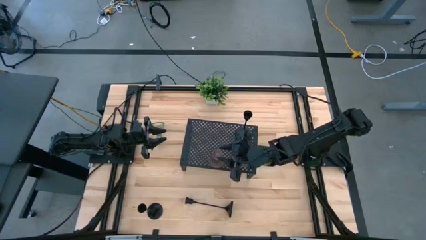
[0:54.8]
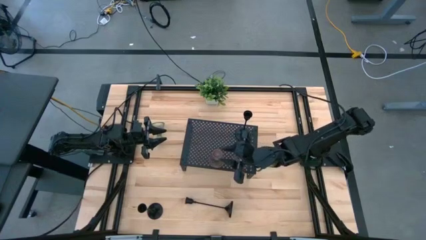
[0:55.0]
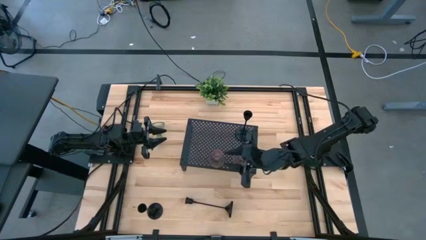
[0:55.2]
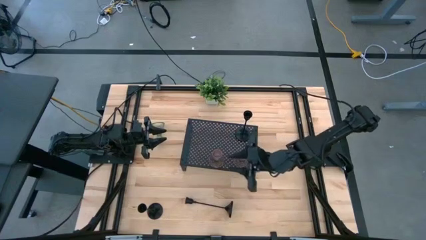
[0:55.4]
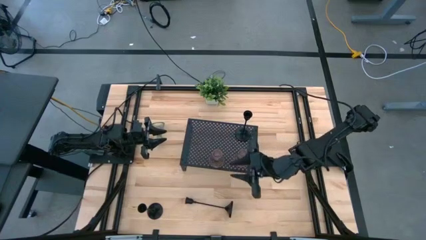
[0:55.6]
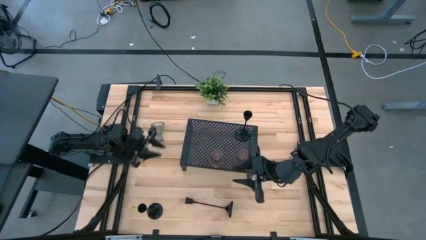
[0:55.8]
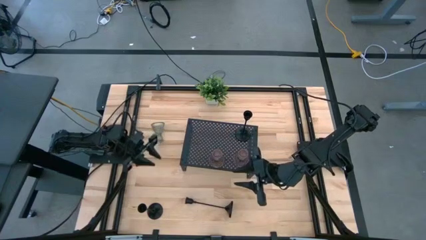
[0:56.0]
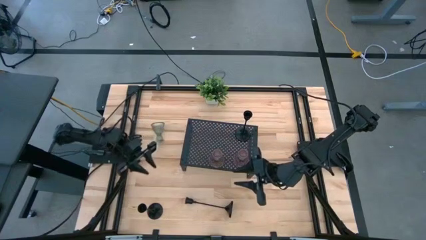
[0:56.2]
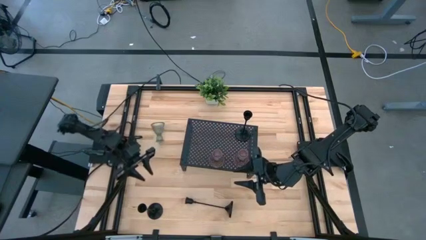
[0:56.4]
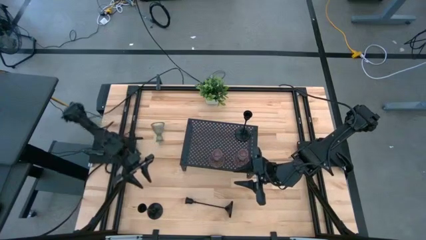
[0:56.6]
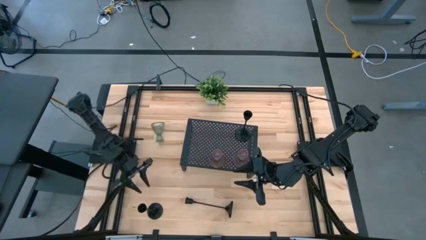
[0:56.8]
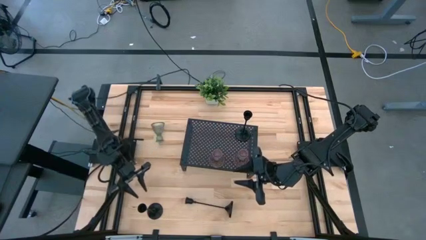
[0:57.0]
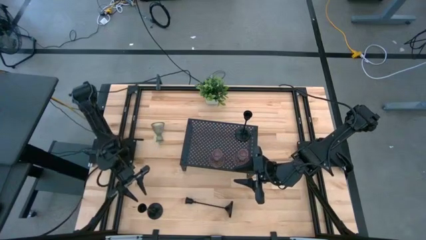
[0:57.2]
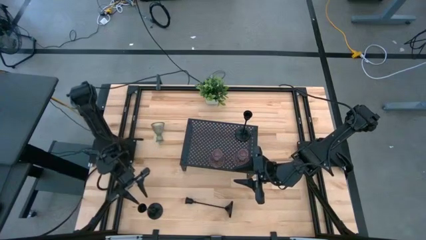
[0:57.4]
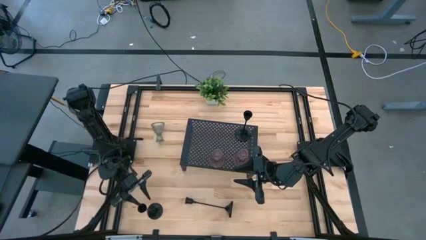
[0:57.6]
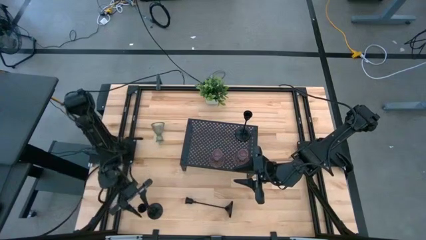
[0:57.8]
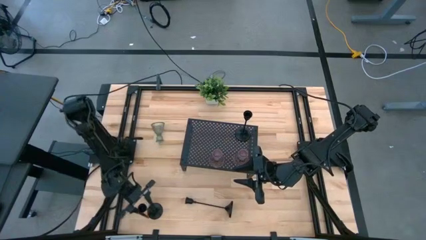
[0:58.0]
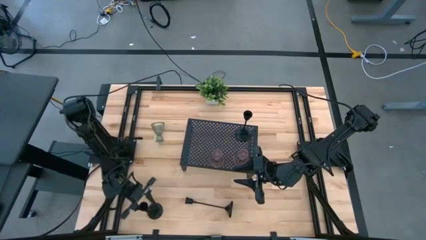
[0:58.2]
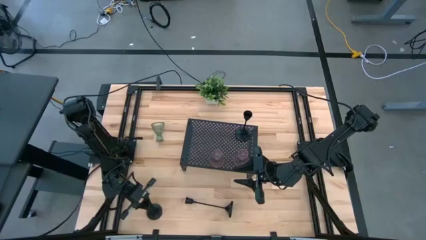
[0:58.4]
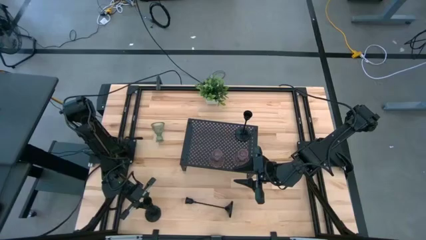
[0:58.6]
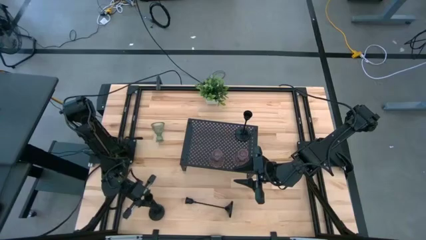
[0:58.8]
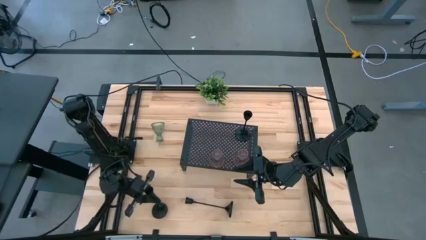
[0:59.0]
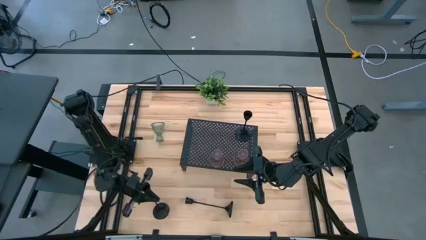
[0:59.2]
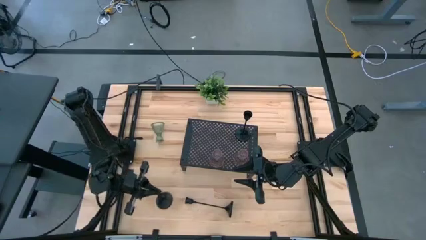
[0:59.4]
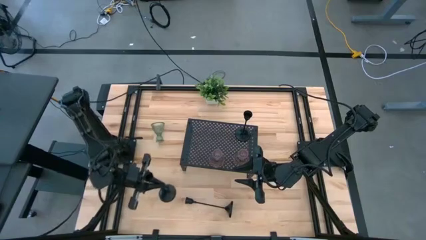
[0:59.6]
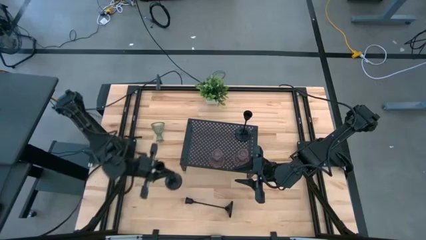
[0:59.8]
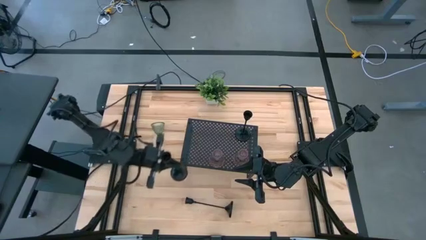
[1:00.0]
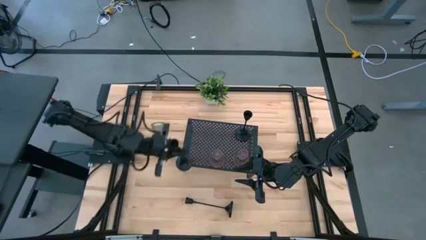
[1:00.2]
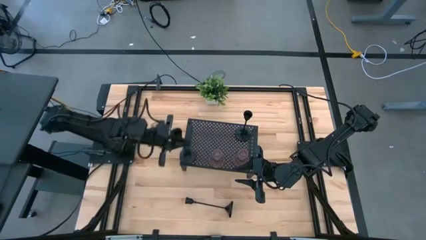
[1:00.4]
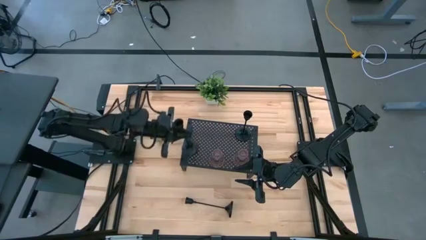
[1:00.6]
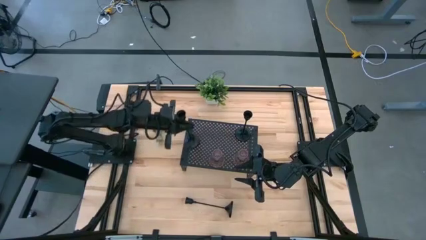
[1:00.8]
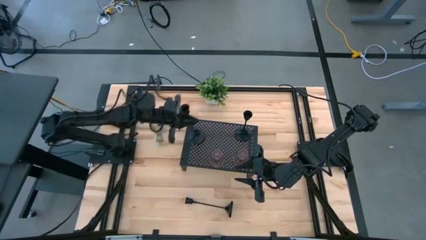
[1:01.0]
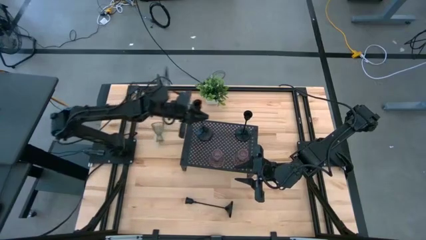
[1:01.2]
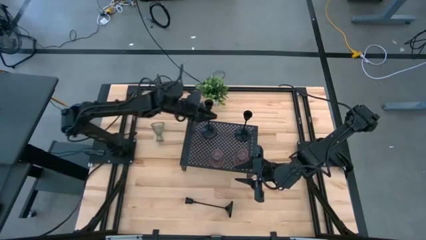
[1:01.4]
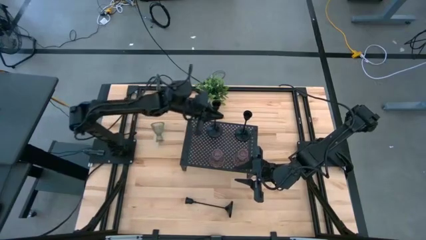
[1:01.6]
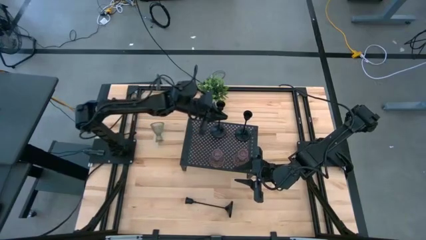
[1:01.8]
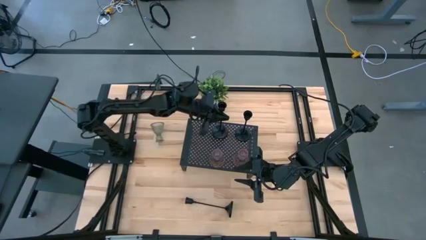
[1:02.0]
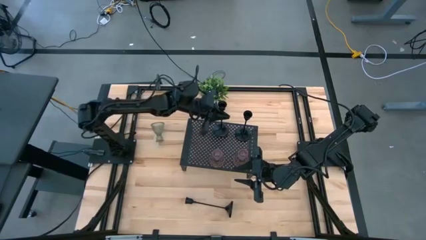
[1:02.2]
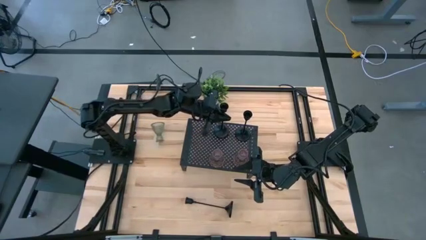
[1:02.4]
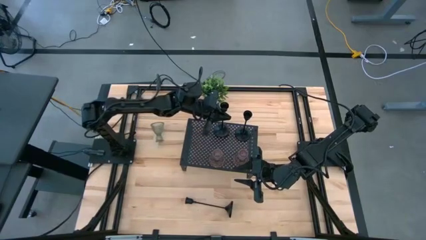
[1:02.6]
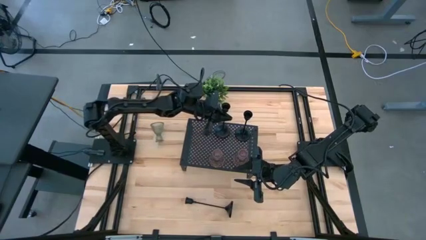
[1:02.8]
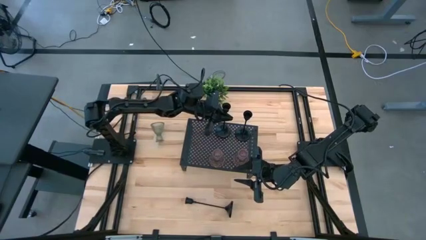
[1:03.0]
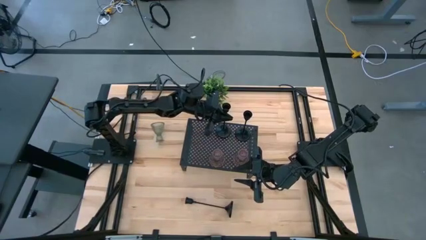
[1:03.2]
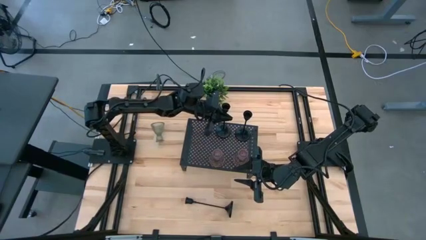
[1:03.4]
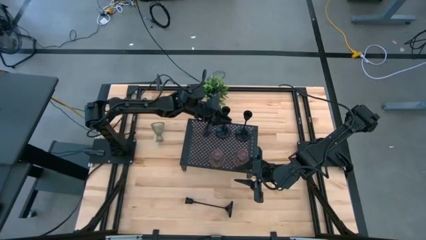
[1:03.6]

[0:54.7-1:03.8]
Task: Pick & Place candle stick holders
Align the bottom black candle holder with the pink glass candle holder on the shelf
